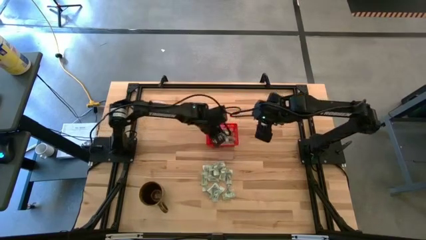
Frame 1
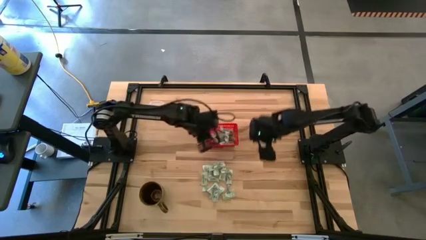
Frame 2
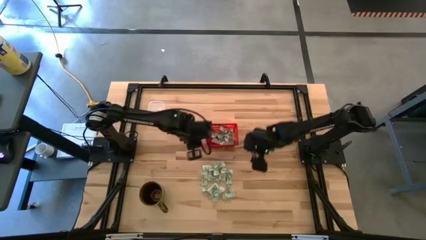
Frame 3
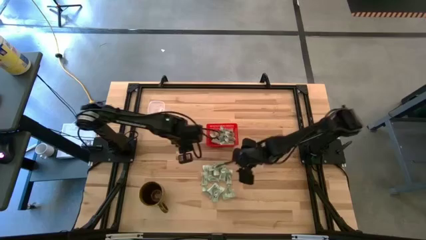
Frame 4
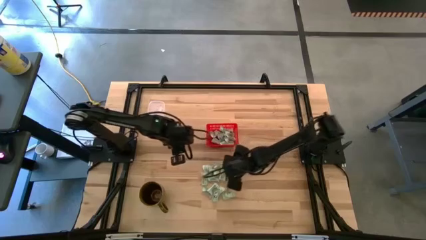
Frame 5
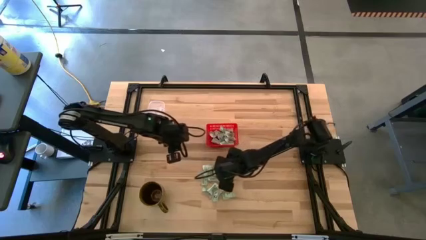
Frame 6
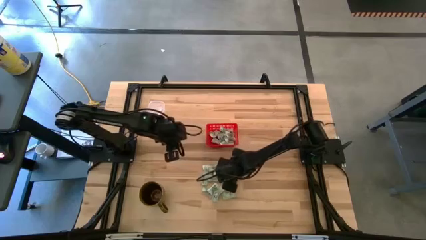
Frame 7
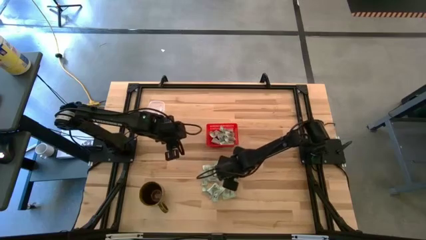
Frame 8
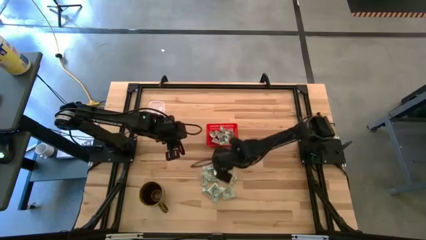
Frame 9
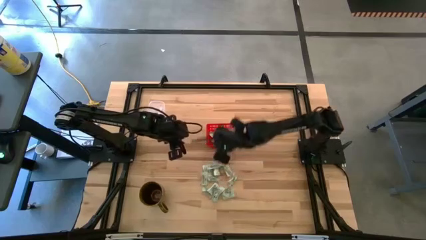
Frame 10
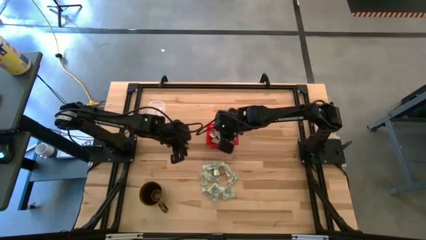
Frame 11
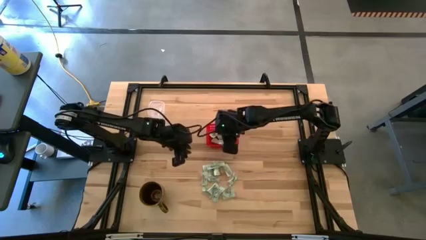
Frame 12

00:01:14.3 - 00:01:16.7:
Task: Pick and place items into bin
Put the green stevia packet into the red bin

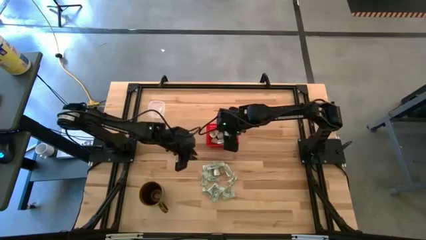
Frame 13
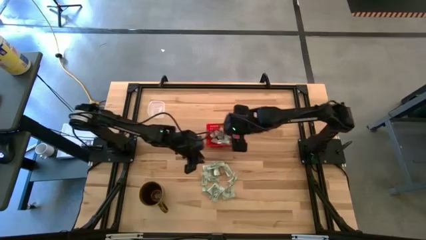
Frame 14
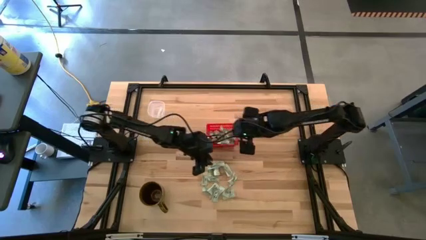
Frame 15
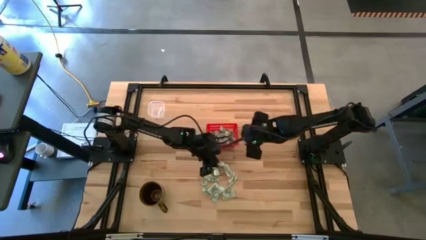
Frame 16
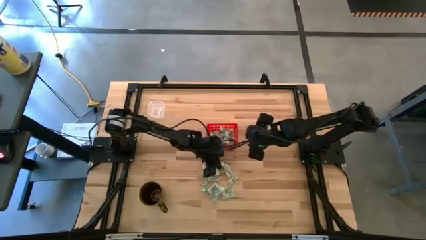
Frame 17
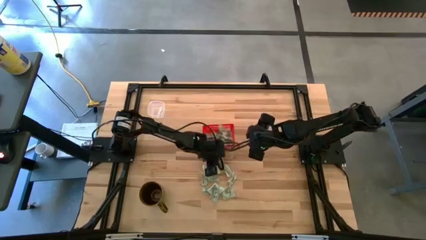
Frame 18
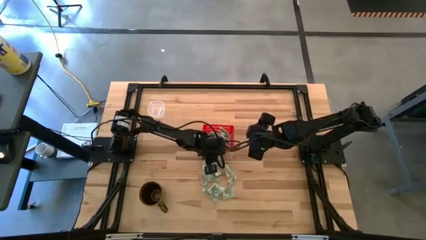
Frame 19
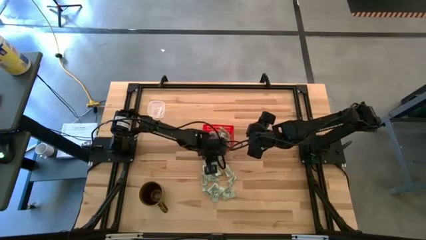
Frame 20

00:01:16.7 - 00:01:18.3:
Put the green stevia packet into the red bin

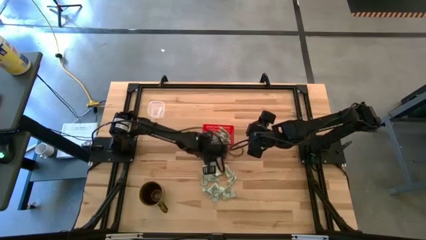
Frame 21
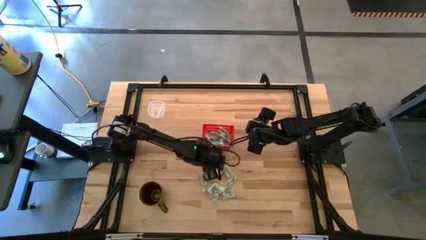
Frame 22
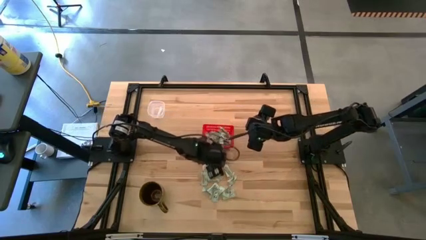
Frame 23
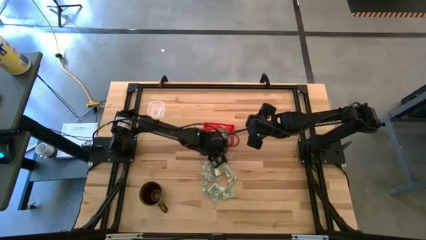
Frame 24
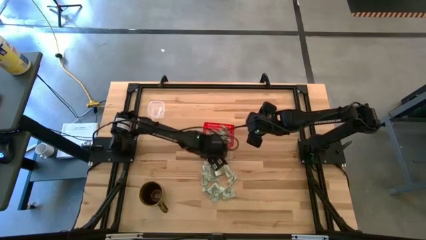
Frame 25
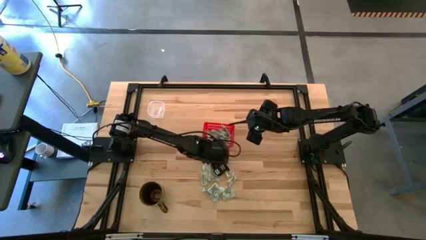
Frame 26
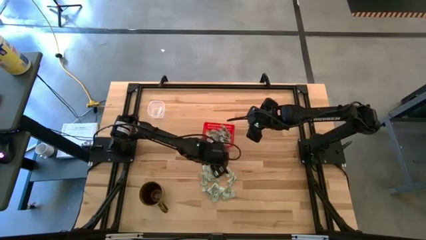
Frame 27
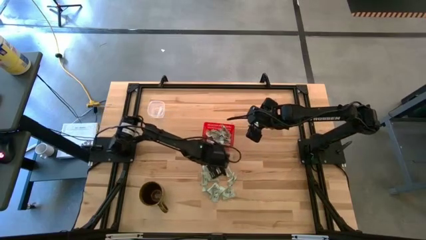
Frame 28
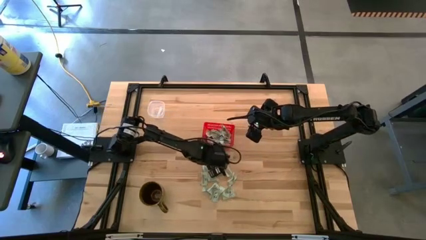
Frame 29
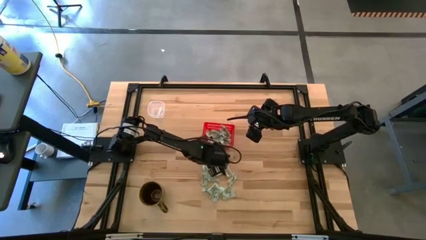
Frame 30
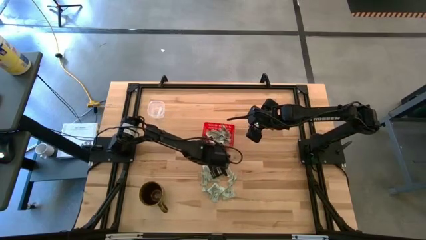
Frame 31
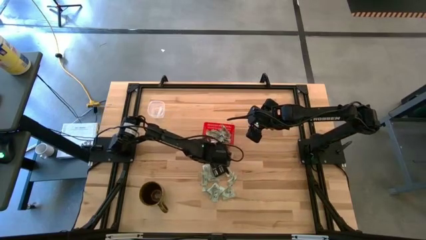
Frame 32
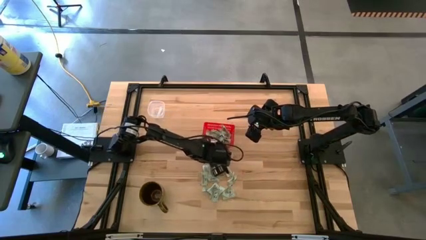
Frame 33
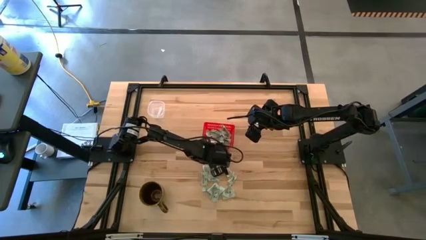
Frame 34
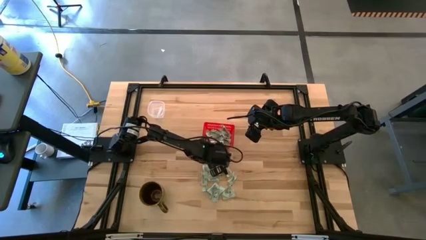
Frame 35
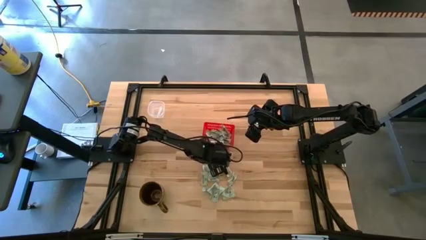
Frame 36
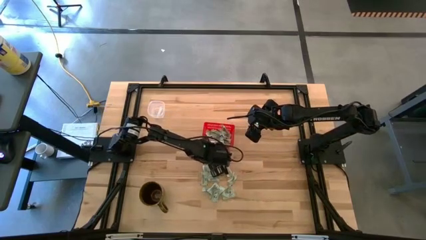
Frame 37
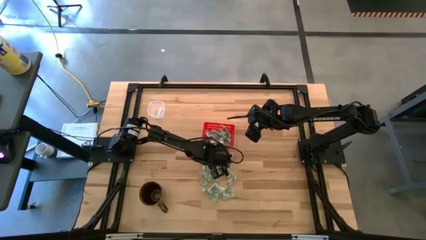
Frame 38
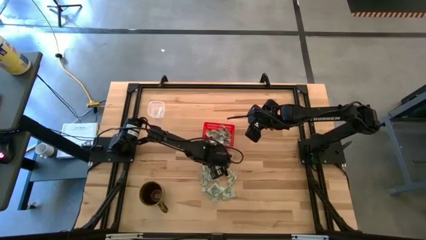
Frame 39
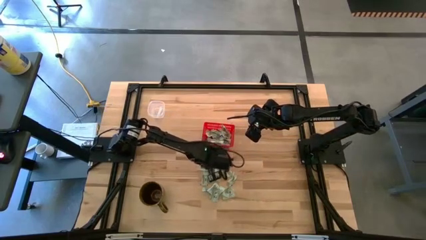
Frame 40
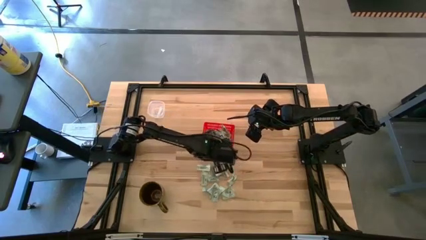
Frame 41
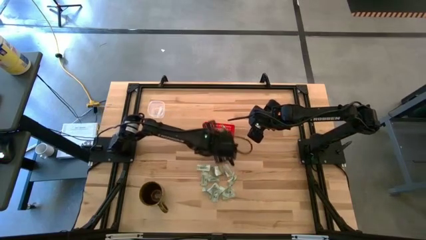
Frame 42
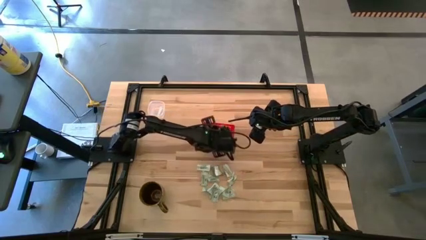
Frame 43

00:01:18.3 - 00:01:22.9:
Put the green stevia packet into the red bin

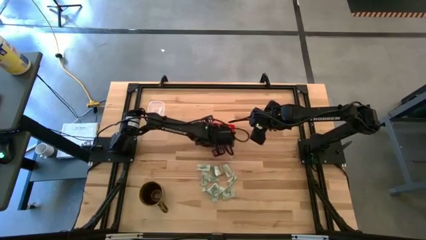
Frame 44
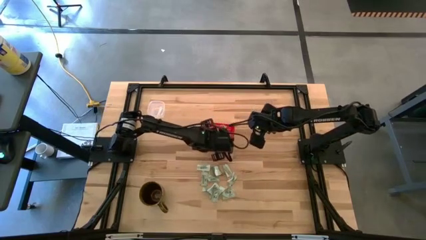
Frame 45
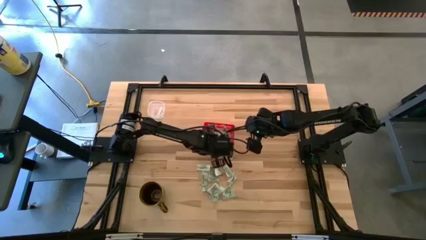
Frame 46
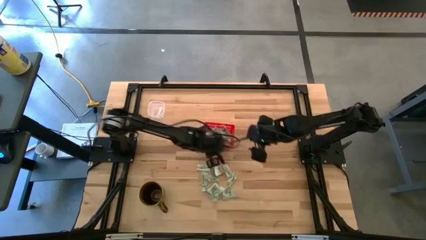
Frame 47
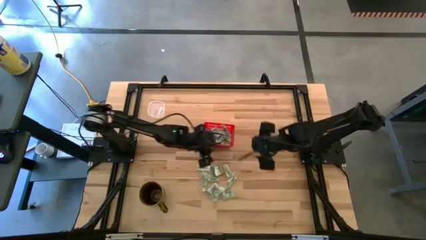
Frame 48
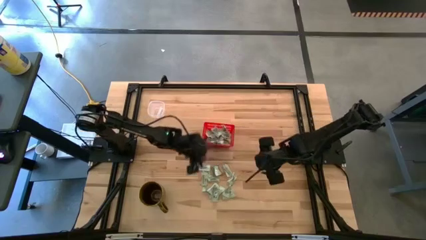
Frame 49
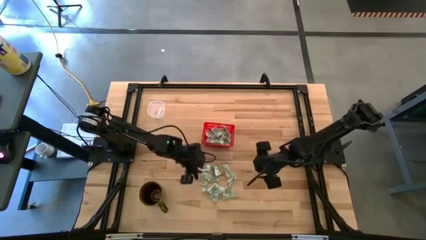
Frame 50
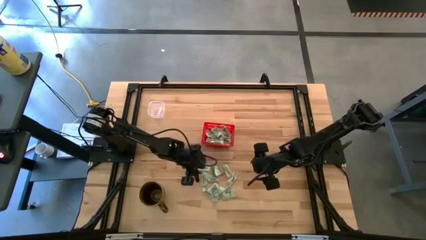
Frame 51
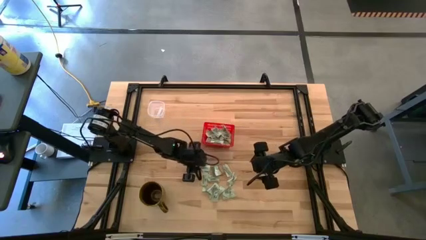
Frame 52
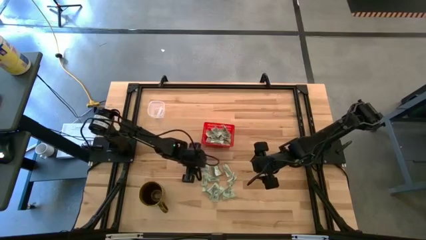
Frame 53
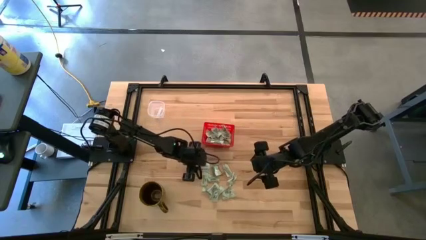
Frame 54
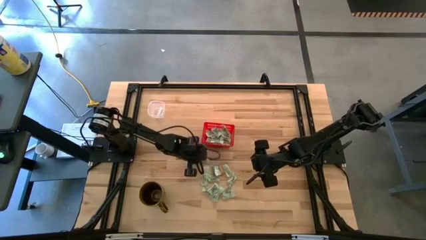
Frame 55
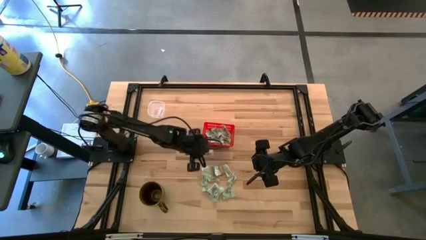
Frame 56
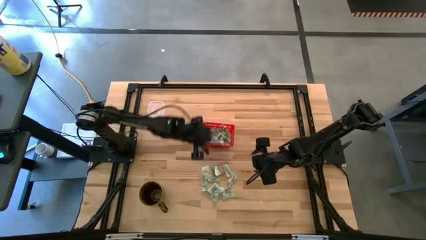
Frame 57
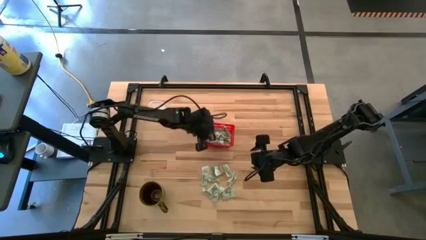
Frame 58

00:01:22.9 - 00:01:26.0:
Put the green stevia packet into the red bin

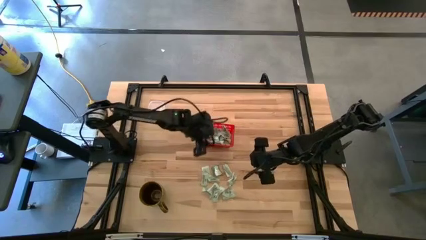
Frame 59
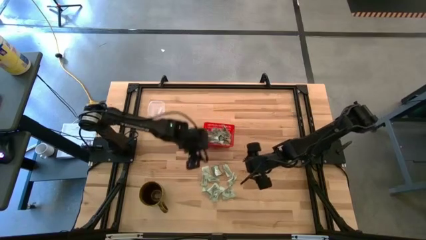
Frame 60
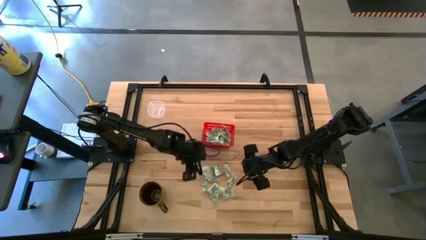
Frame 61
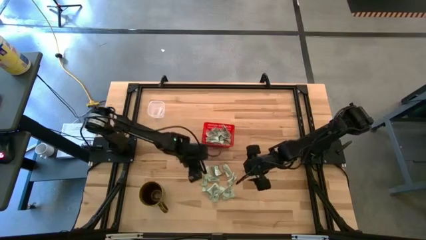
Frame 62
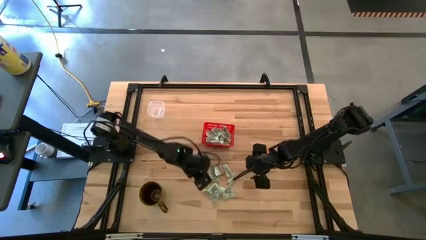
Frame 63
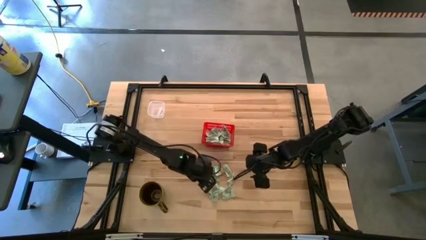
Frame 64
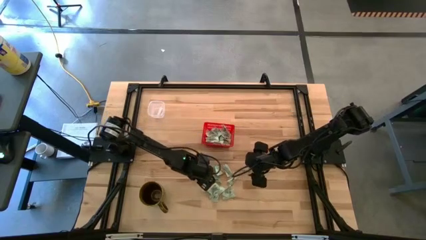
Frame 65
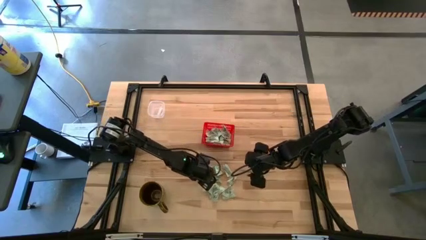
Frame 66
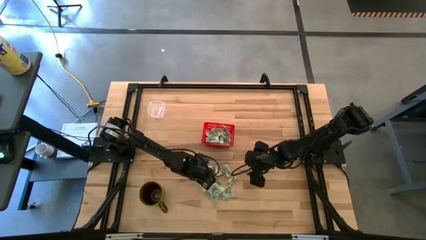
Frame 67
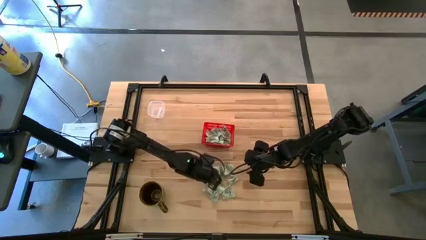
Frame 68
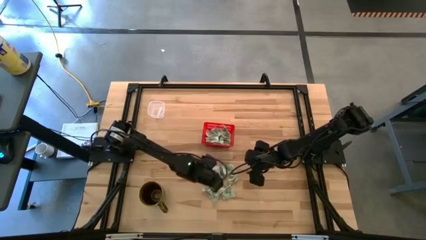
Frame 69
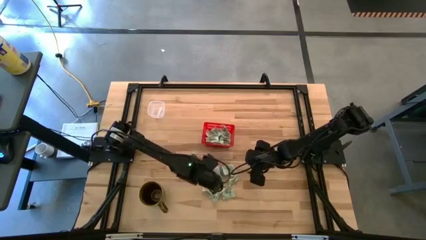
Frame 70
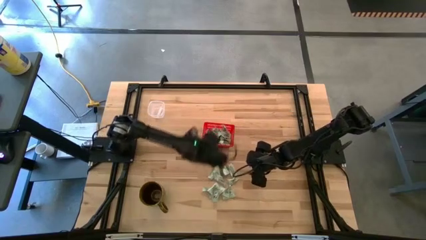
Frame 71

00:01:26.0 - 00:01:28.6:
Put the green stevia packet into the red bin

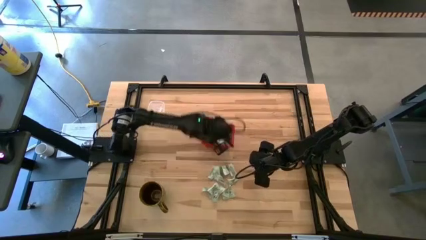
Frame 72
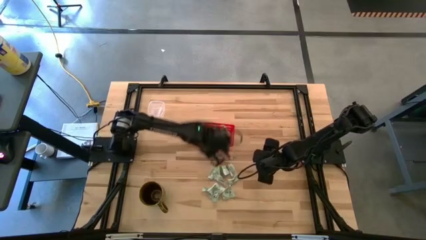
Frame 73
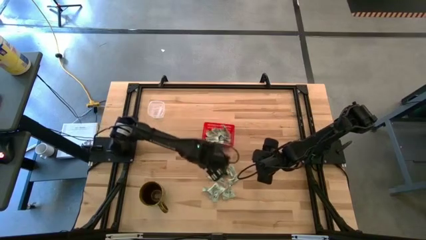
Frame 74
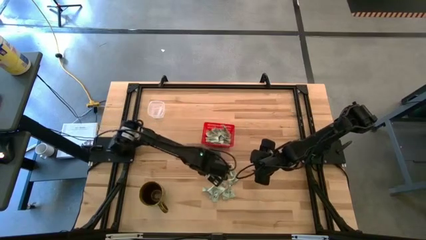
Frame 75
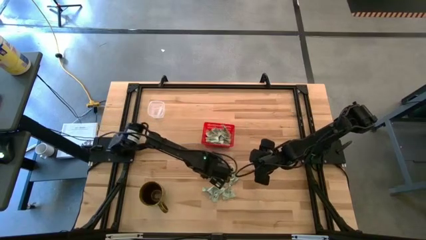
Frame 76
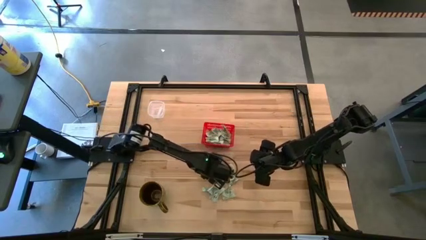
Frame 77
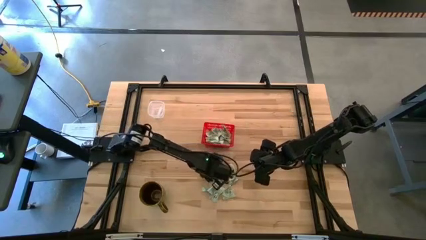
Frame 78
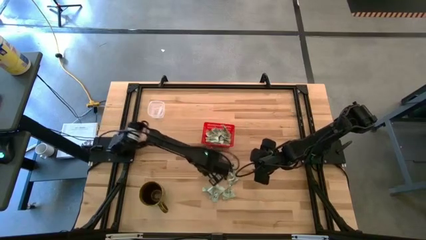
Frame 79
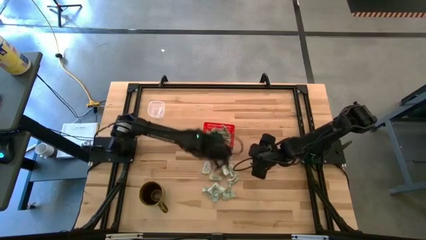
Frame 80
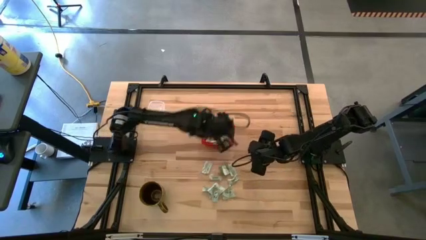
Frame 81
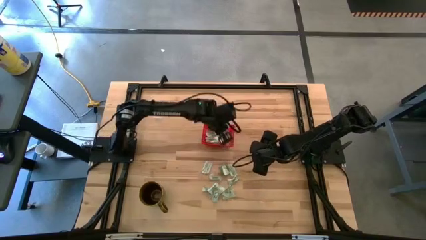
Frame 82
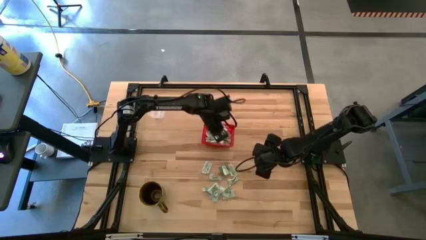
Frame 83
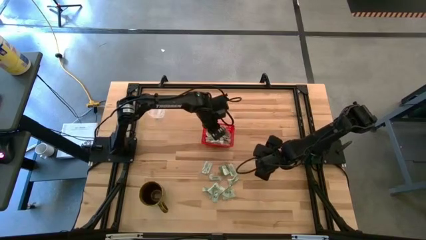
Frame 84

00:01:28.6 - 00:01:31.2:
Put the green stevia packet into the red bin
